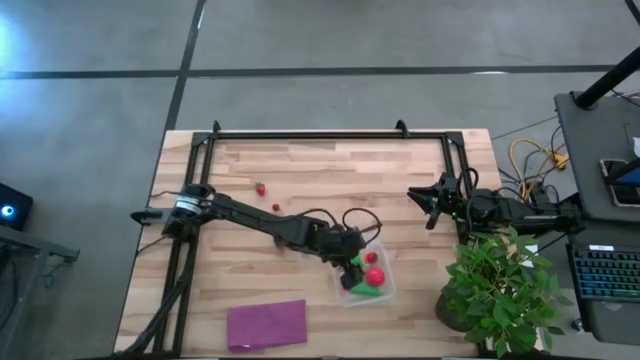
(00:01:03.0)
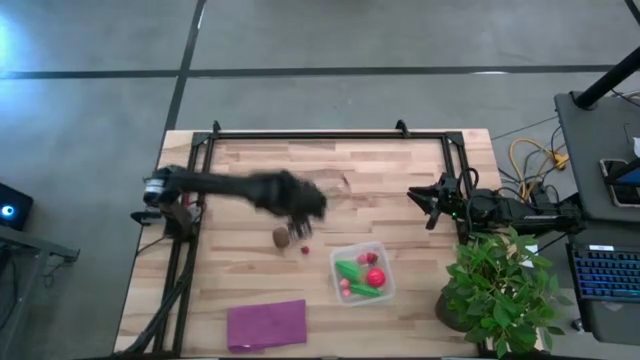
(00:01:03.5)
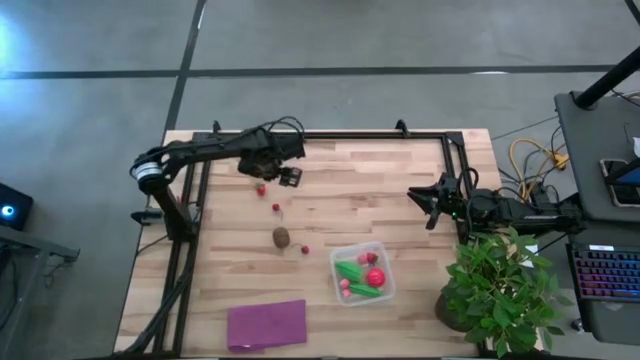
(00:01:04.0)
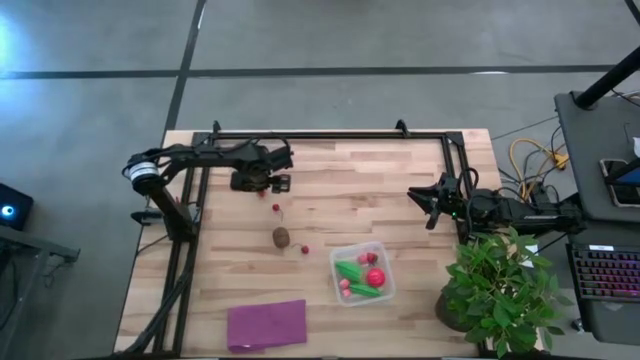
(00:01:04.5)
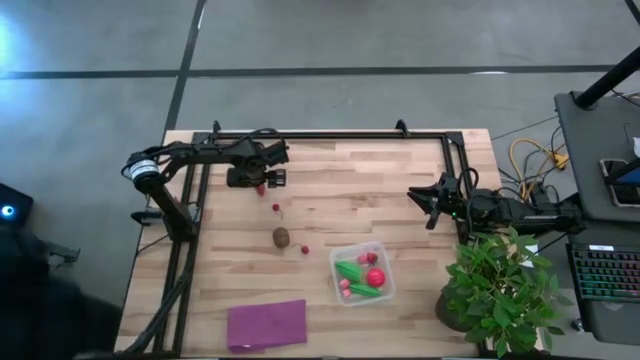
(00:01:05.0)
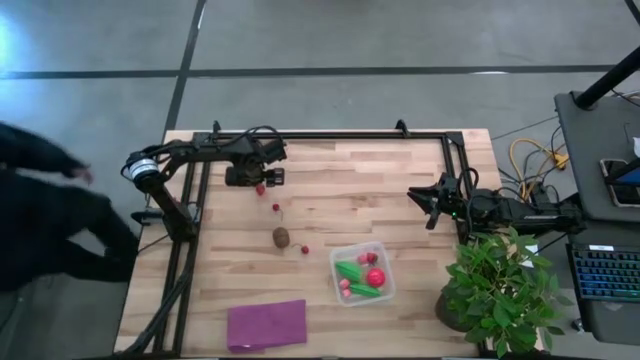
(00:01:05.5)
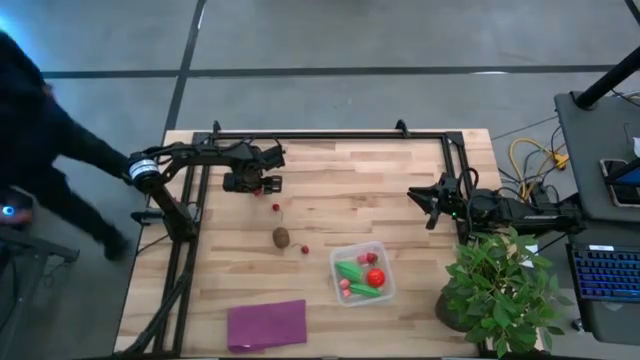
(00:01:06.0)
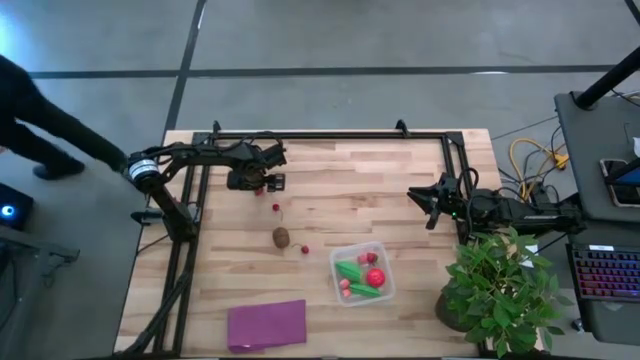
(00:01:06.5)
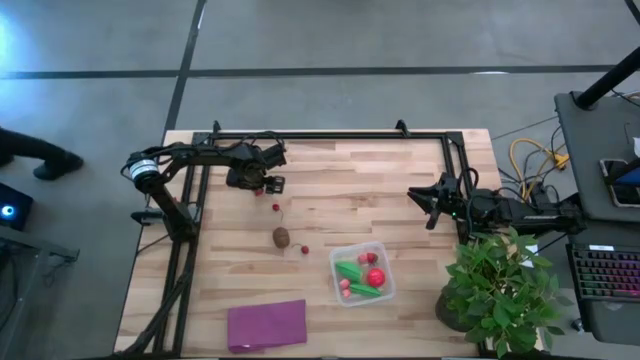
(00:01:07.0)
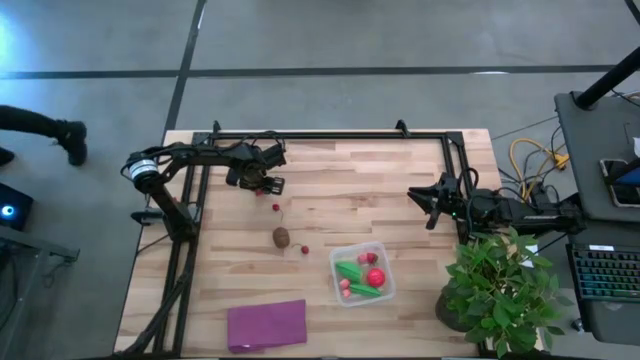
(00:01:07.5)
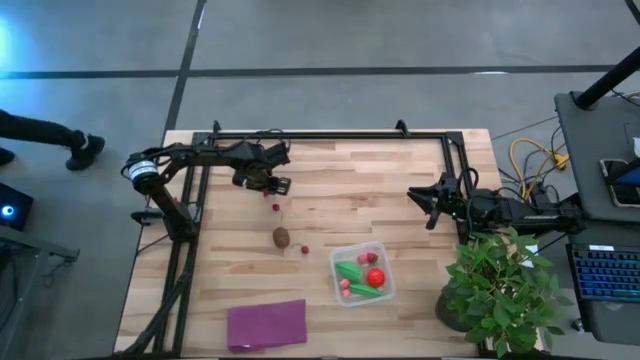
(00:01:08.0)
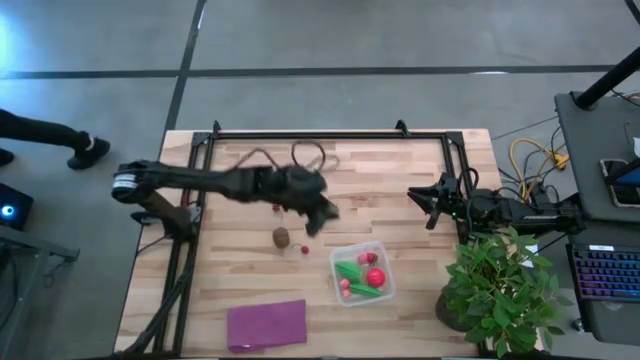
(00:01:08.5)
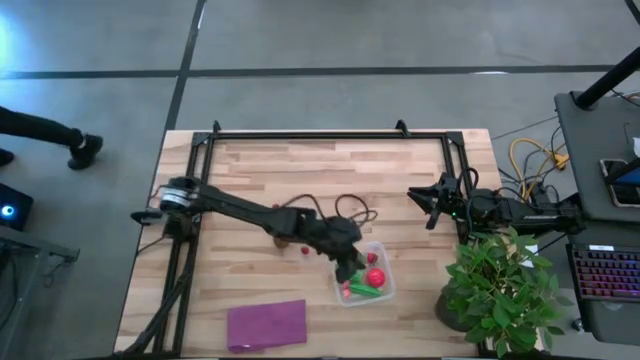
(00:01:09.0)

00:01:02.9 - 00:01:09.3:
Task: Pick and placing Produce into tupperware
Put the red strawberry into the transparent container

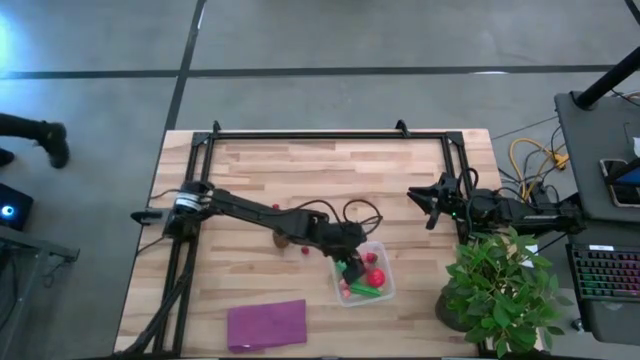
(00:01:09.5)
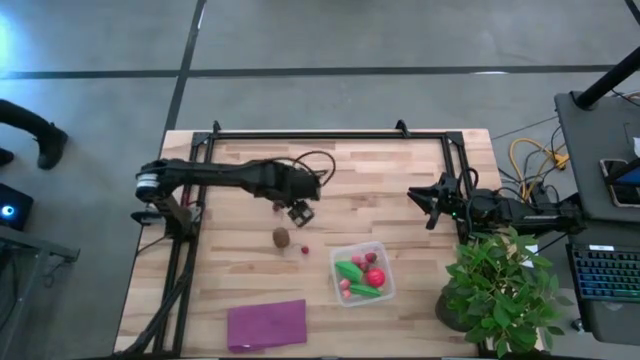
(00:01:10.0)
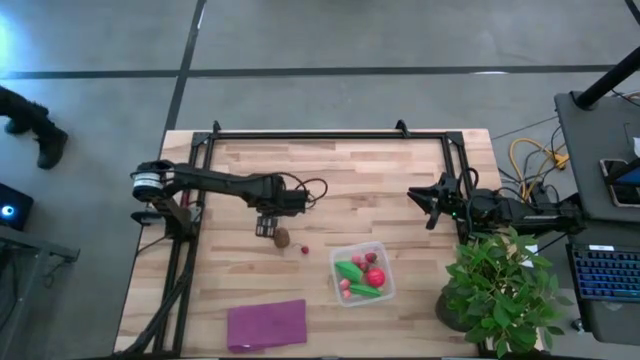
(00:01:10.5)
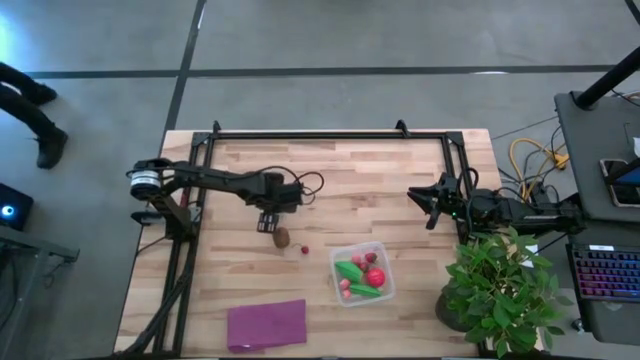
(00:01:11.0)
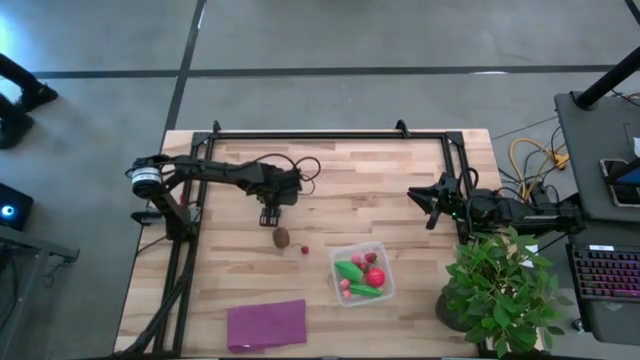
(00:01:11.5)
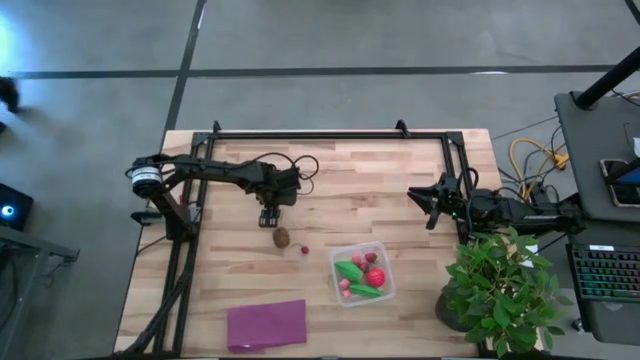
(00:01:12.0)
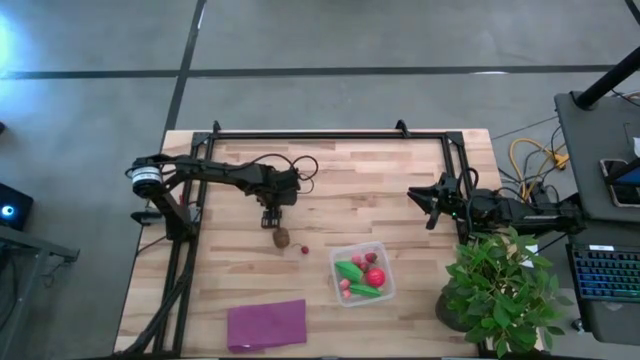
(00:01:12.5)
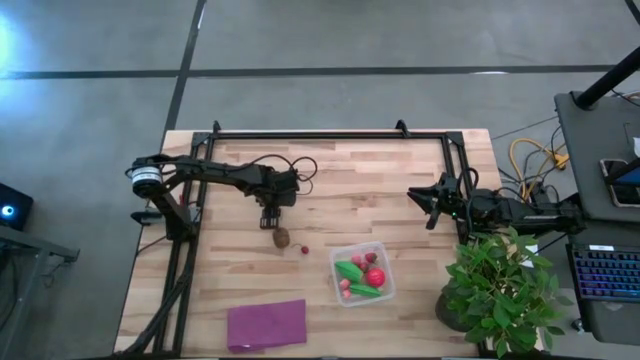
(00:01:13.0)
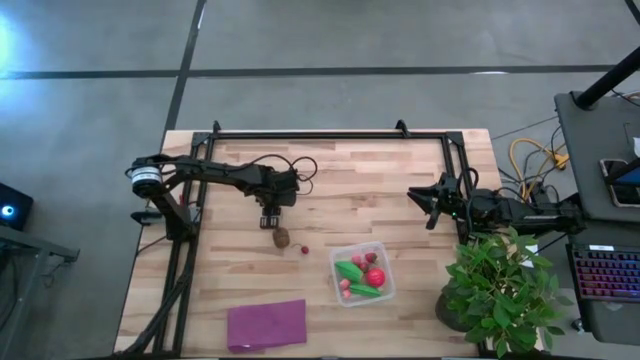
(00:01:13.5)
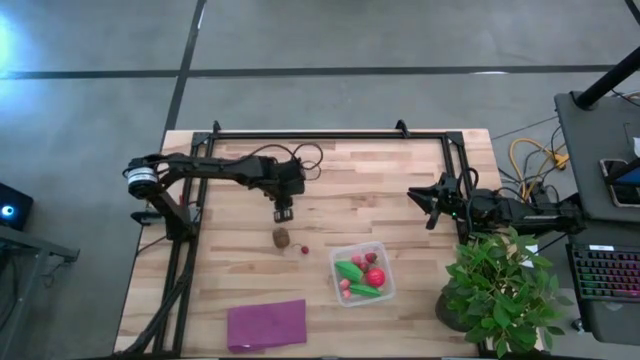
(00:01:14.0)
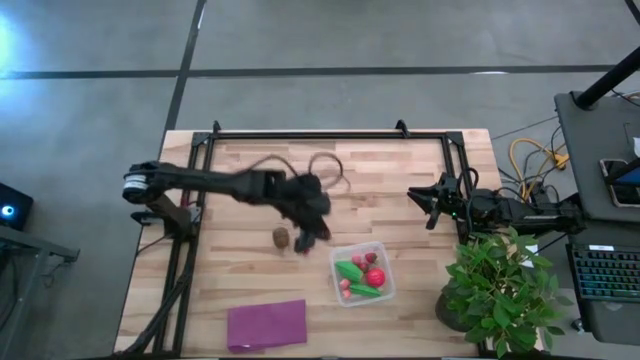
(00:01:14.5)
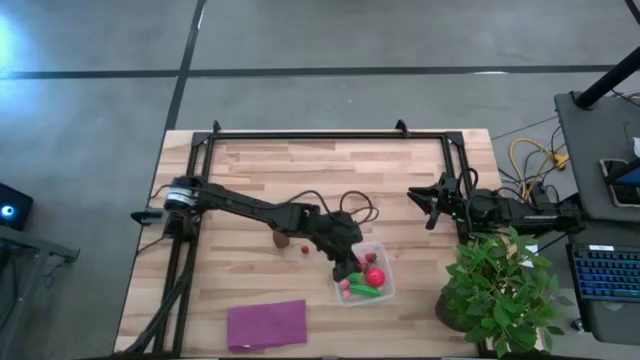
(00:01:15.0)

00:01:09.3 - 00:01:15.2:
Put the top red cherry into the transparent container

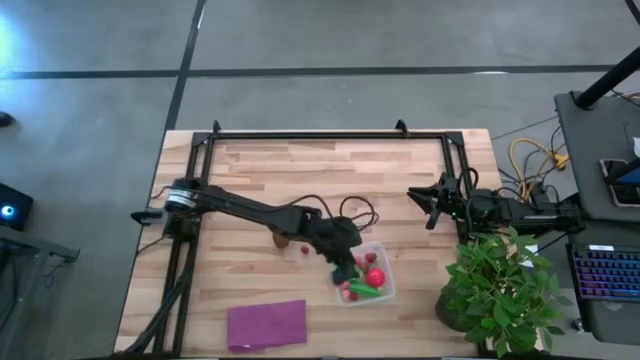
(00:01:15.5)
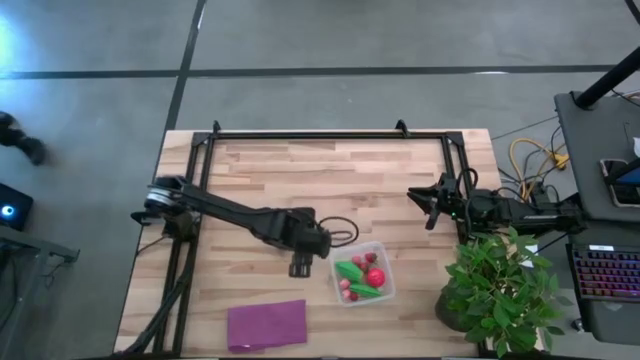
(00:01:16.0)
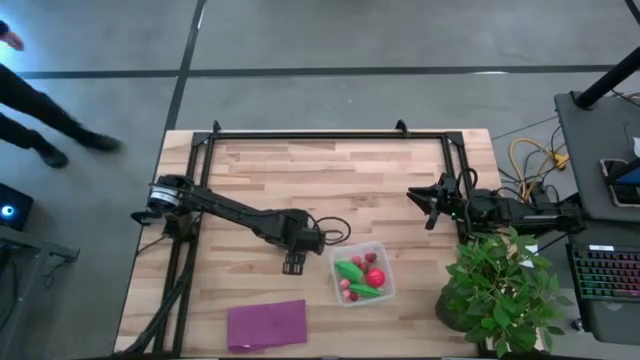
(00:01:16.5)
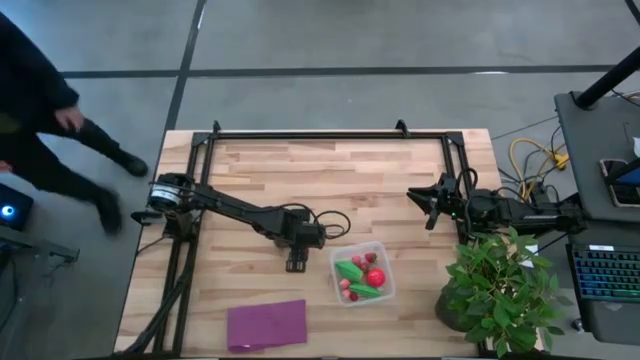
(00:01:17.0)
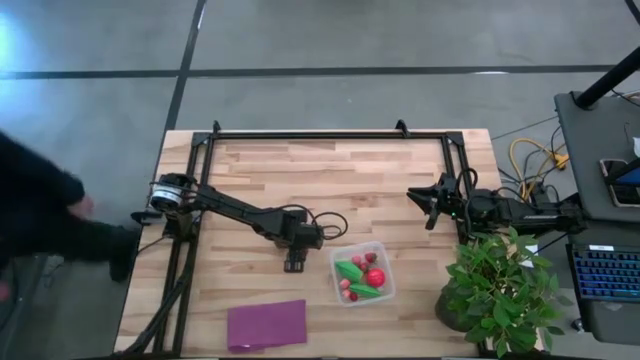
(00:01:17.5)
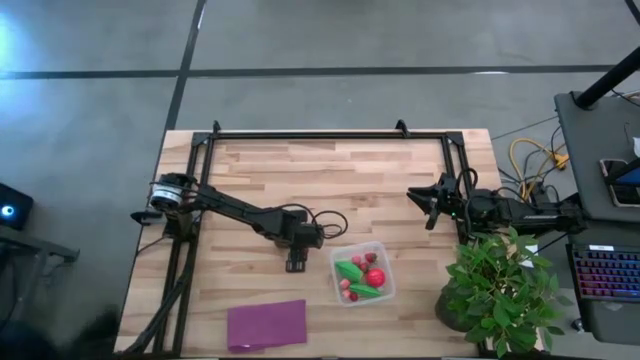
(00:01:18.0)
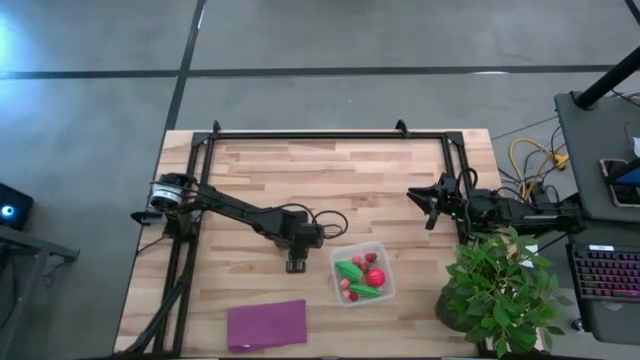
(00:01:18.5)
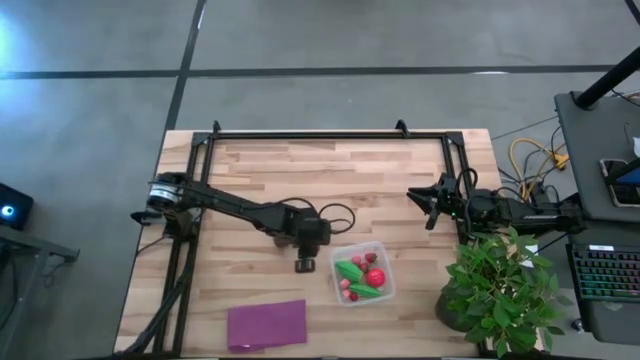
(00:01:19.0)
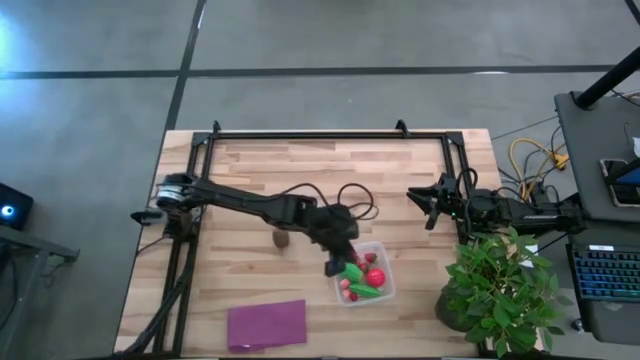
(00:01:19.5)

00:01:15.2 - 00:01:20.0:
Put the red cherry into the transparent container

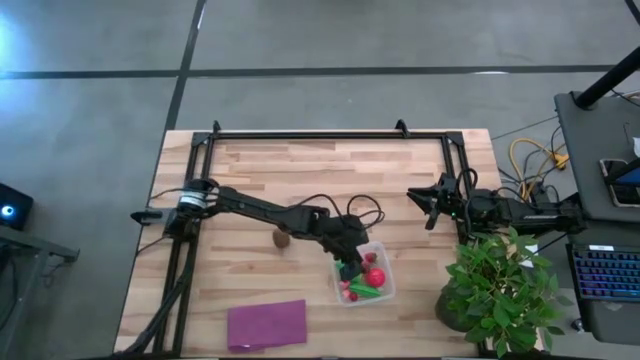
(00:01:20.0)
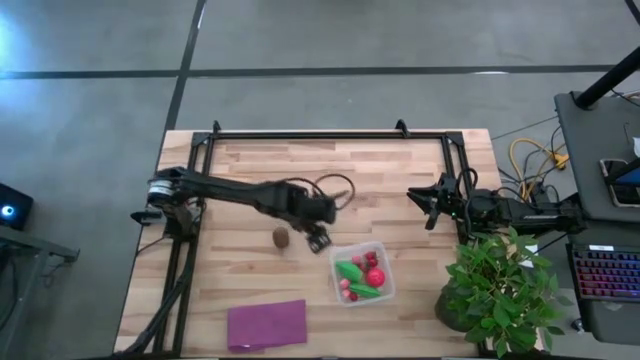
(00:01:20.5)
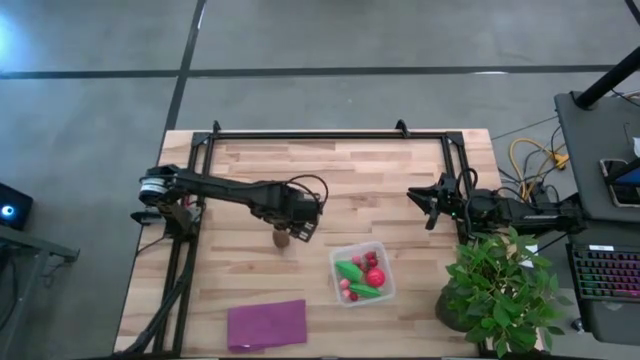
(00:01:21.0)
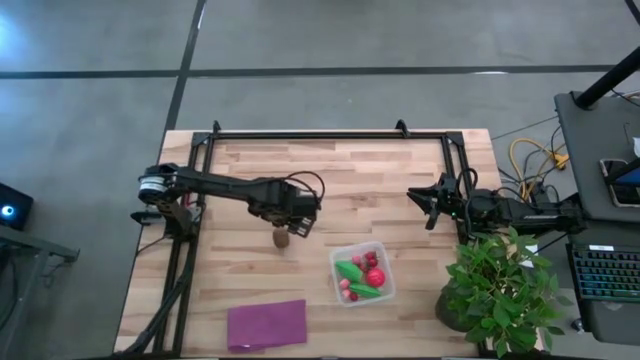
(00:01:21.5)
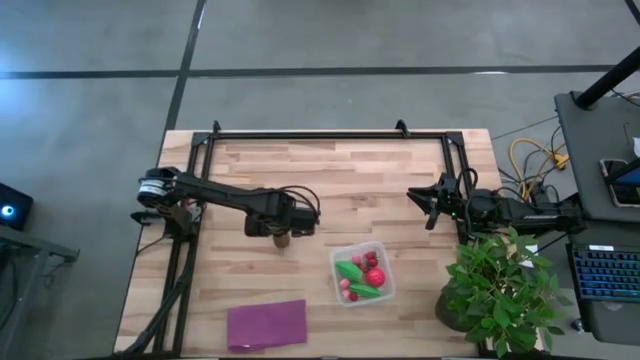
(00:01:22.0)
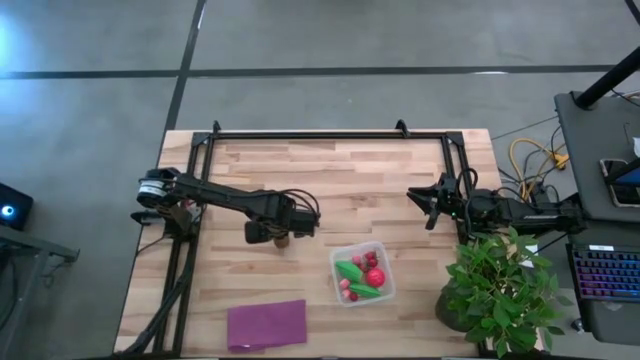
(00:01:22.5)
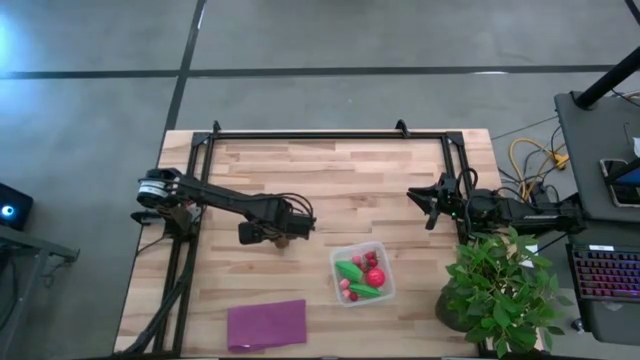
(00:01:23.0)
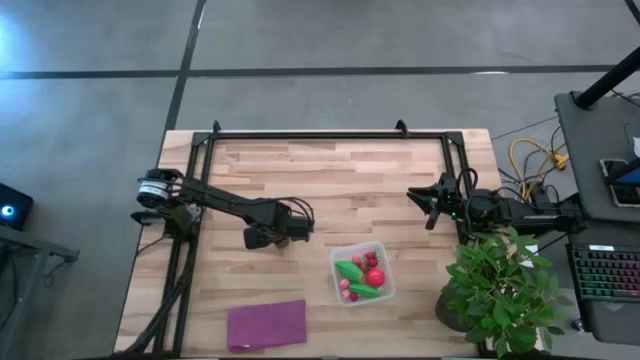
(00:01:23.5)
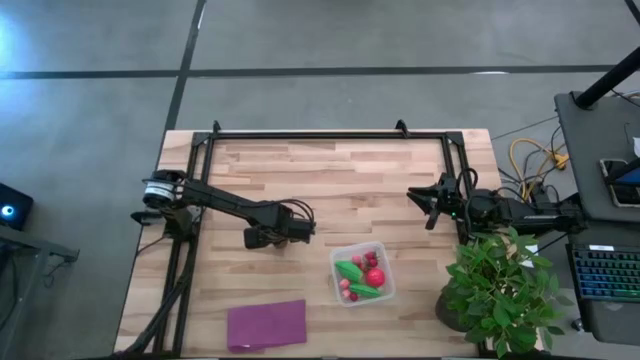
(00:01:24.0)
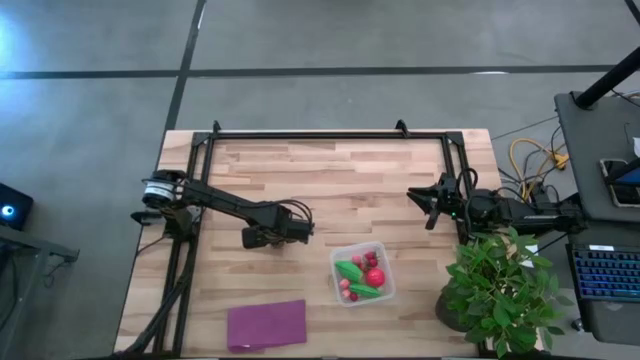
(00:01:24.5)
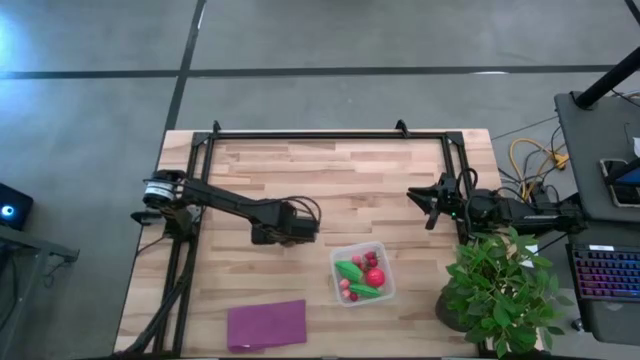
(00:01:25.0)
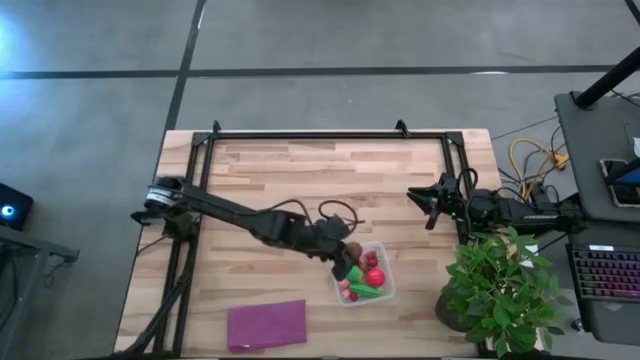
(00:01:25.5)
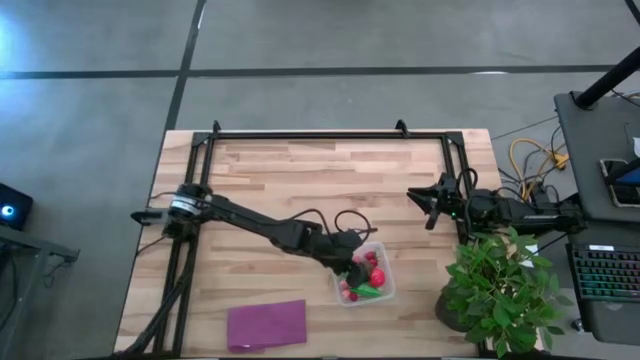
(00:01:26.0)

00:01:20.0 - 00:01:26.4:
Put the brown kiwi into the transparent container
